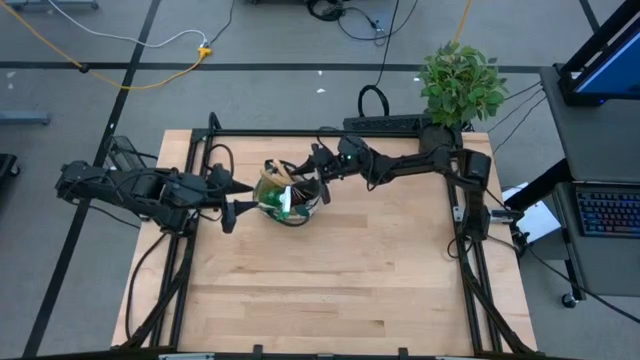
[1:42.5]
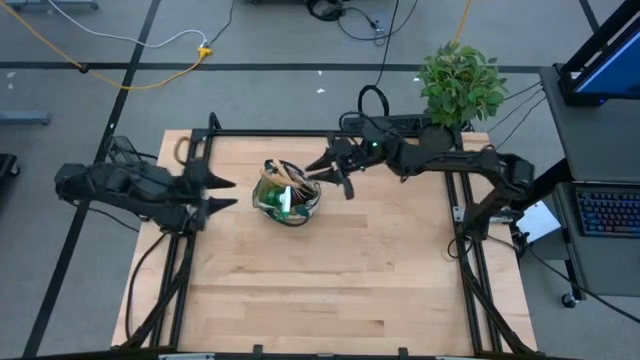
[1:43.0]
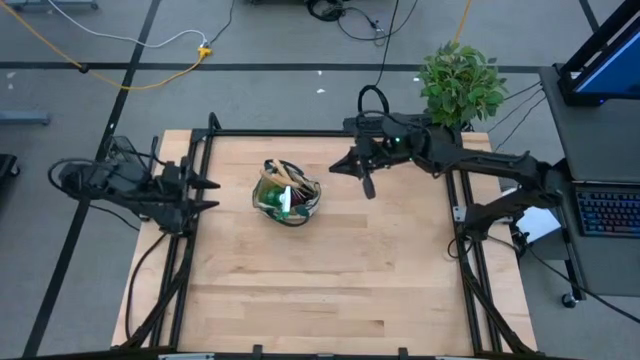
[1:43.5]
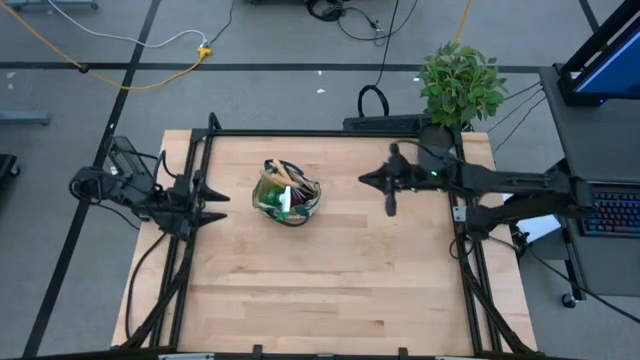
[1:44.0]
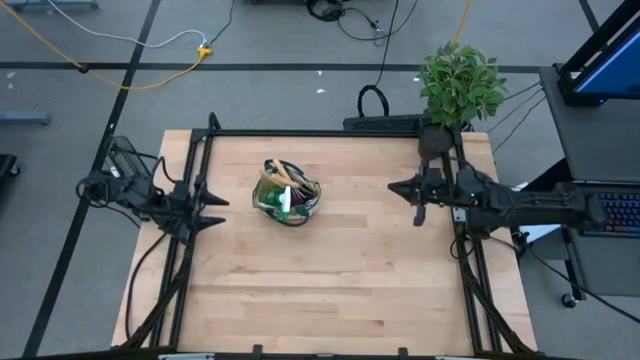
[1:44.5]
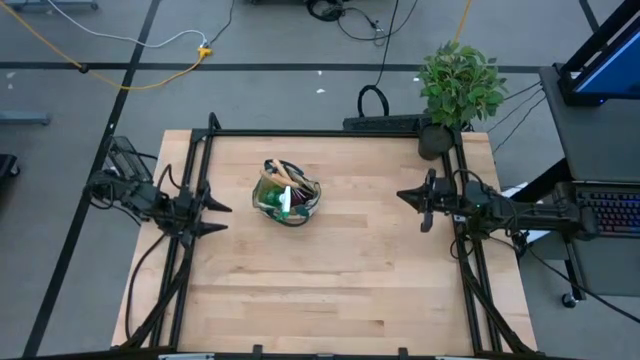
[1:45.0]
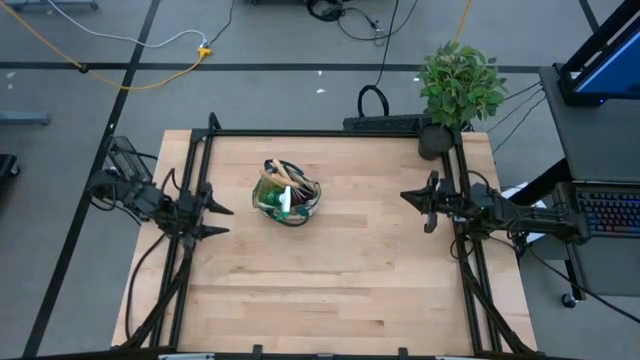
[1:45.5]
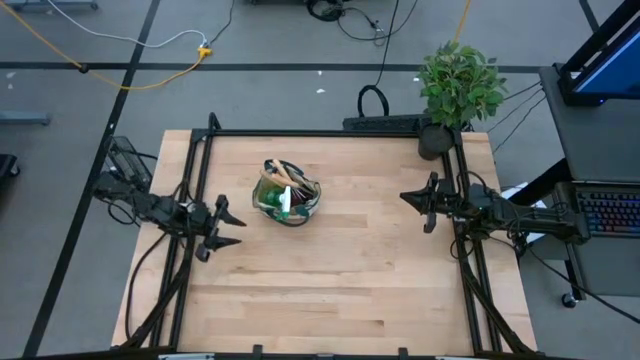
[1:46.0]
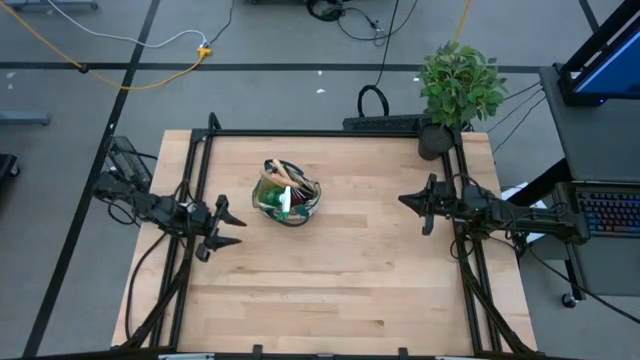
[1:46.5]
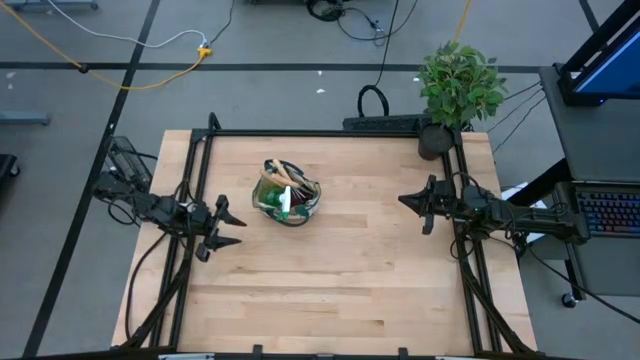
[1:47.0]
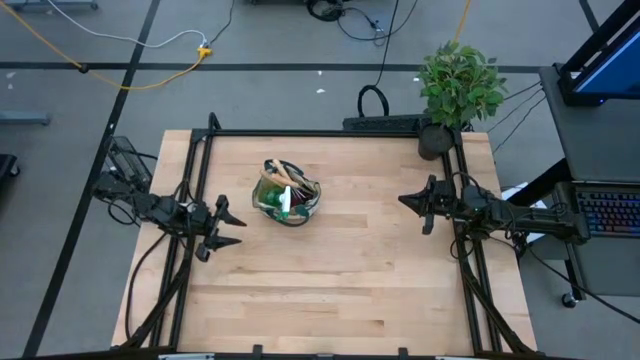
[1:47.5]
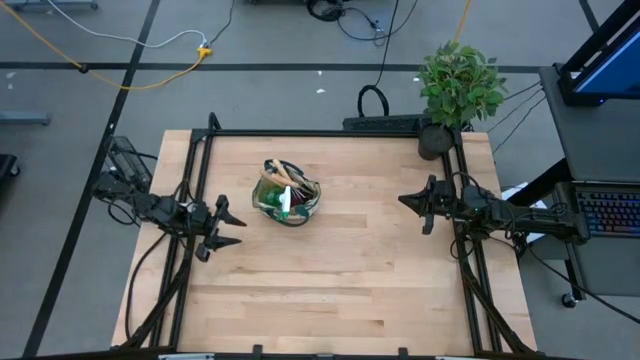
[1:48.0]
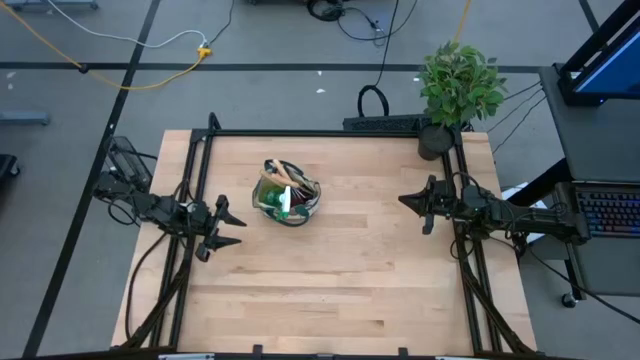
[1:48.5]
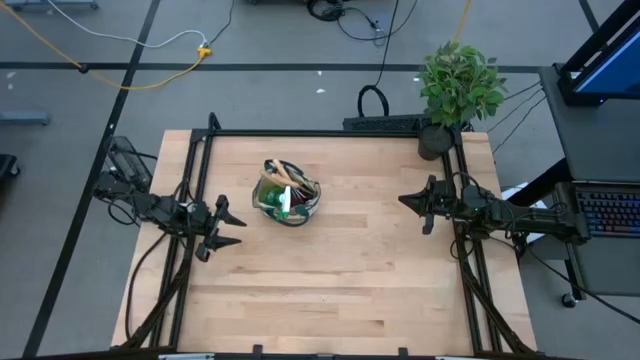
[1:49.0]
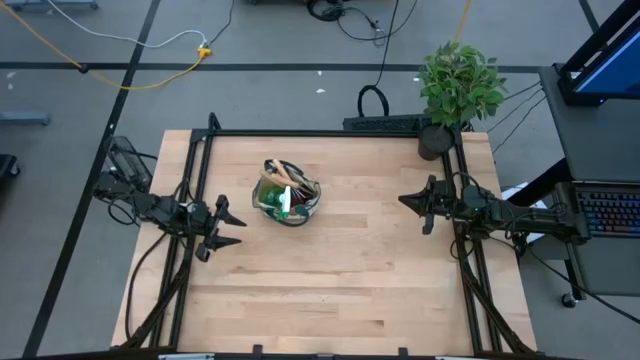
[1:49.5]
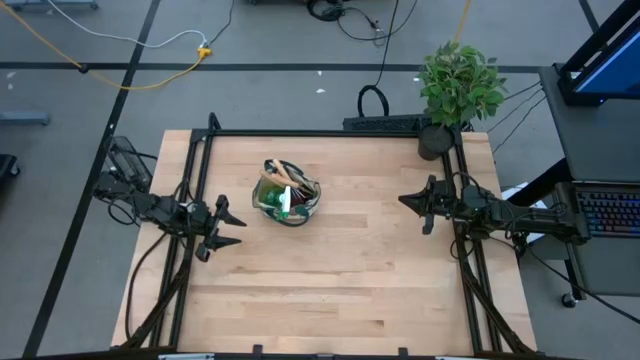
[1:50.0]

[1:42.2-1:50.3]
Task: Pick & Place Garden tools in Gardening bag
Return to Home Position

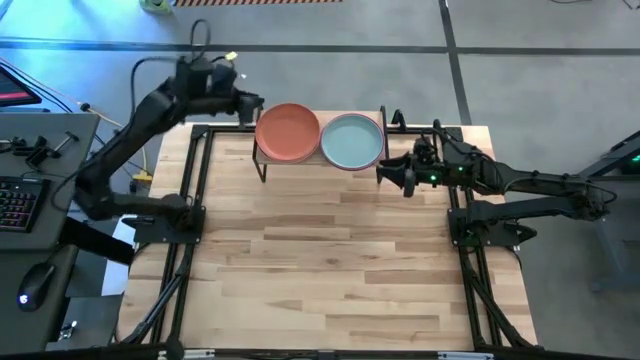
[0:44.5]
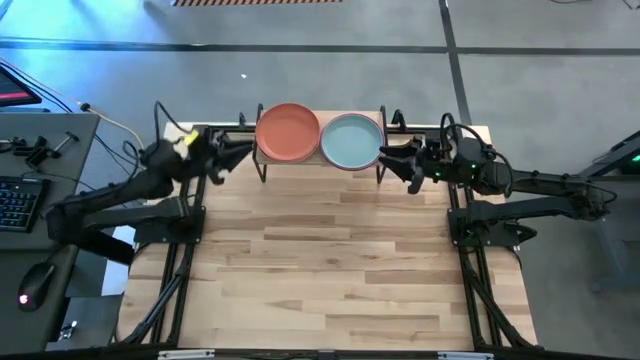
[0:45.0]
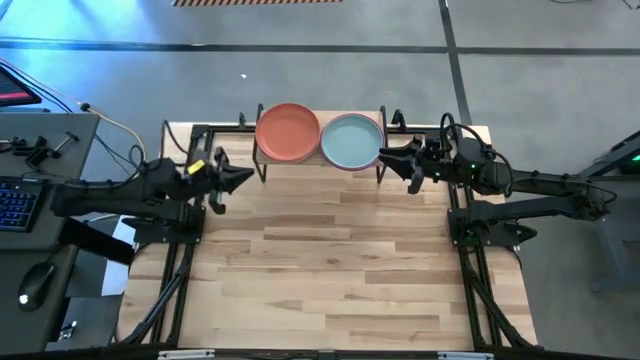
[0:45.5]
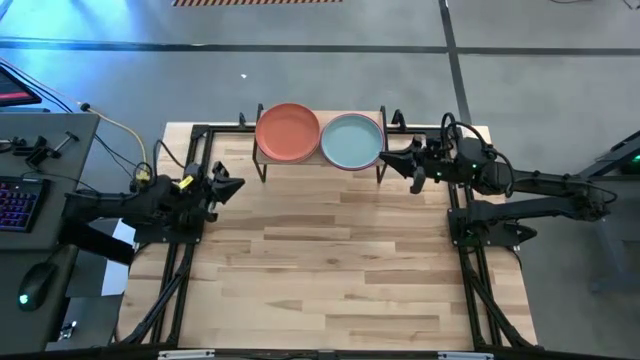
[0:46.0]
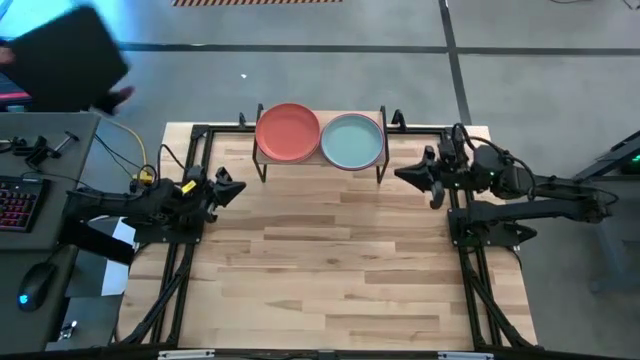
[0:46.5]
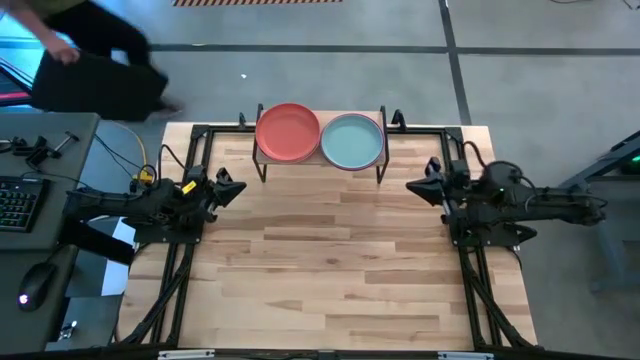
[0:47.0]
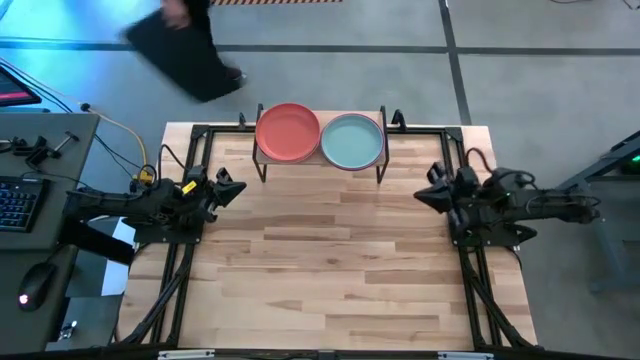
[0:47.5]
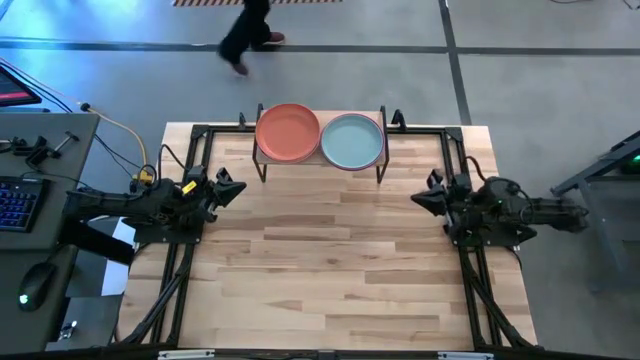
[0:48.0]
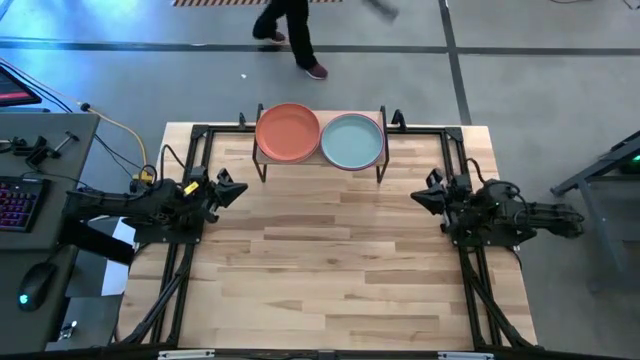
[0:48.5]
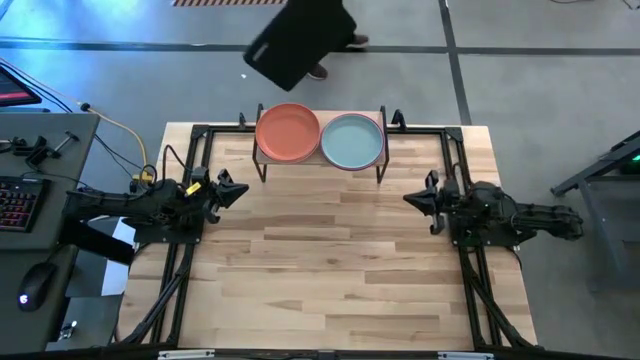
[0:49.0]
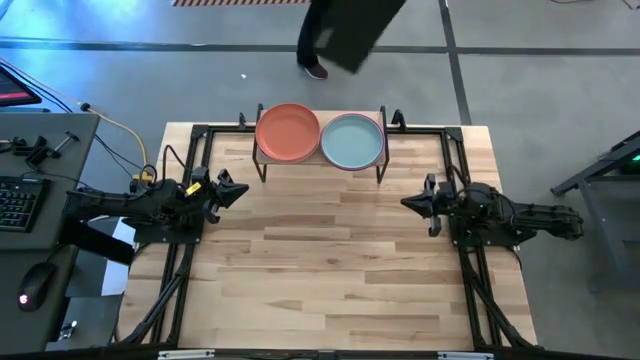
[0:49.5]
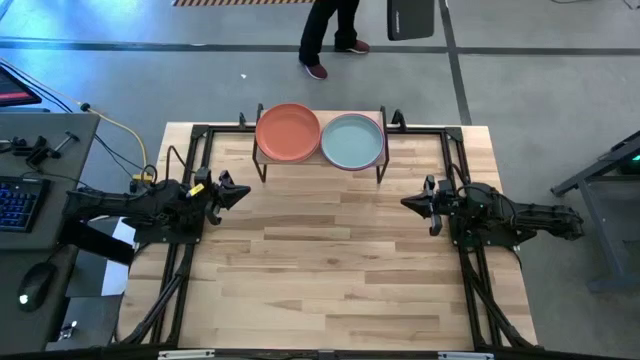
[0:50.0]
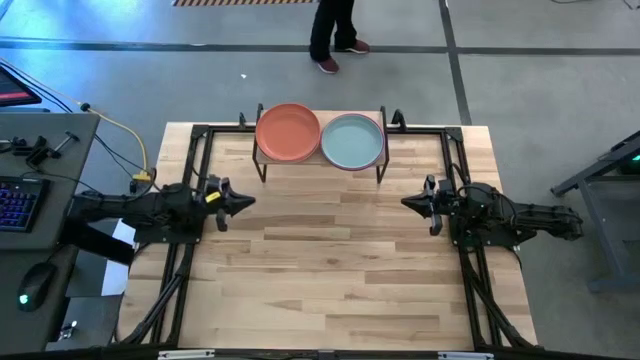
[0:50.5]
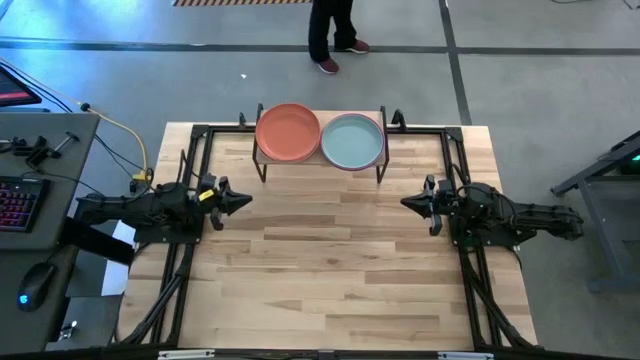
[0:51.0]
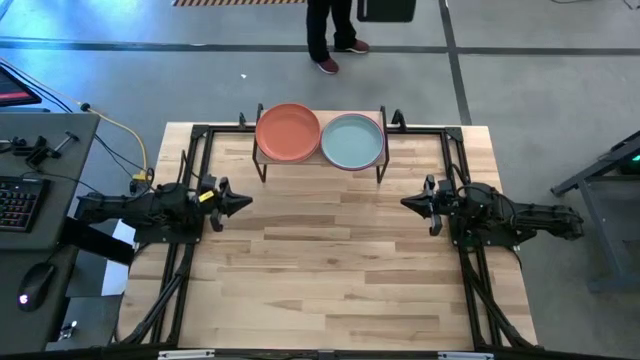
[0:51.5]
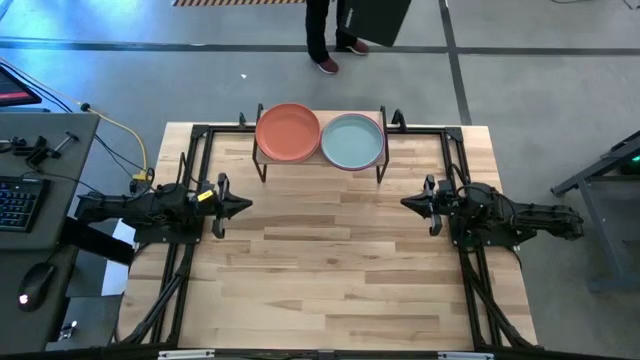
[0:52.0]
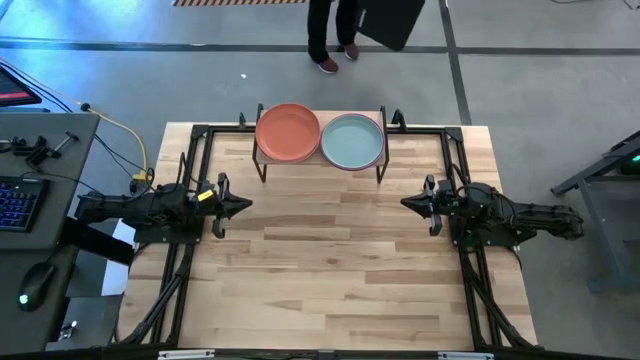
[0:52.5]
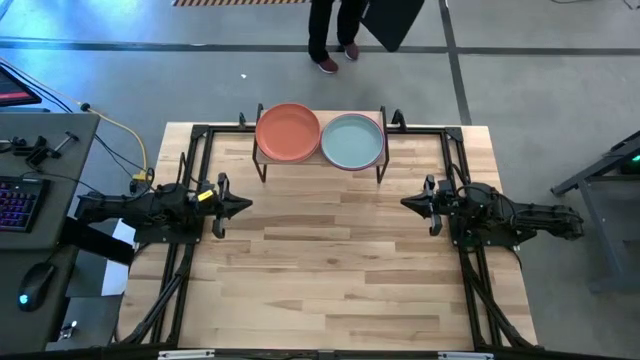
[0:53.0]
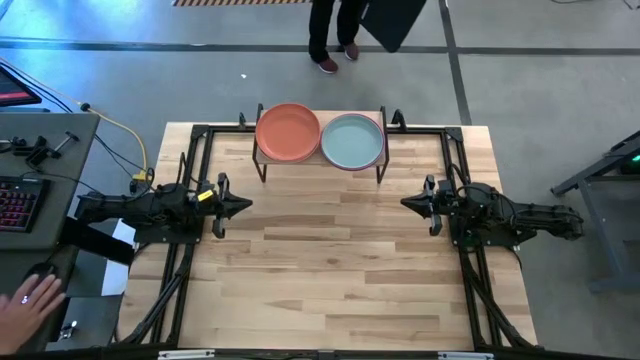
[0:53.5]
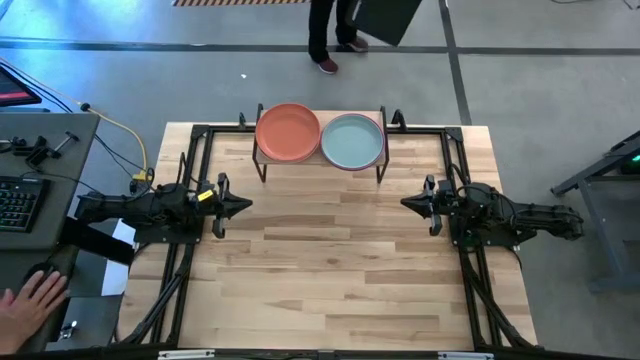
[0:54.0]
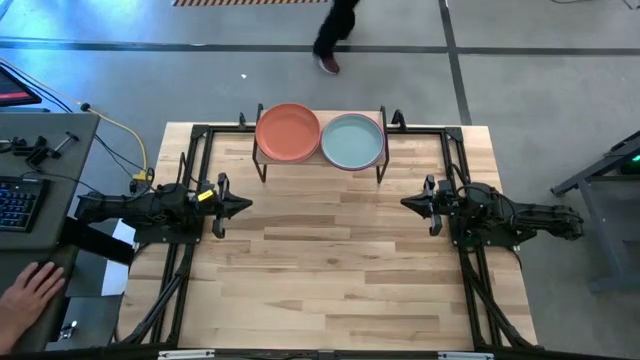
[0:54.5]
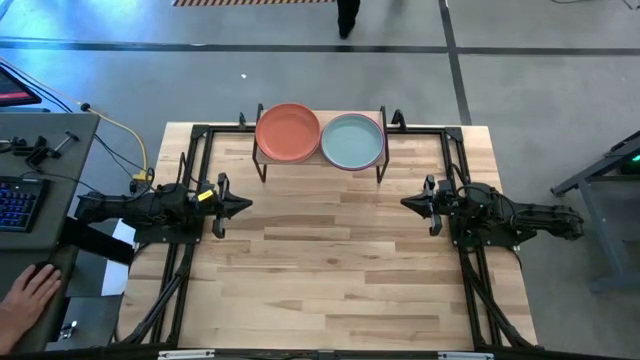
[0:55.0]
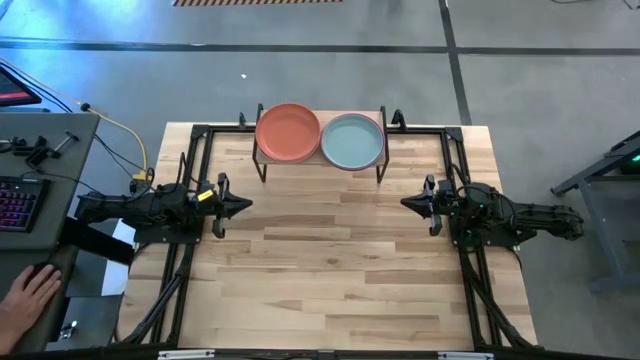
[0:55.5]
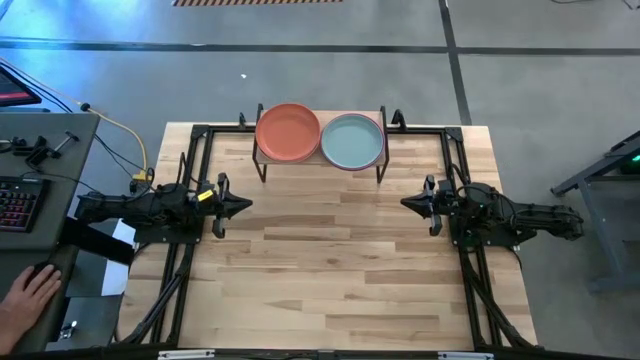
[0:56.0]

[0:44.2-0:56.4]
Task: Place and stack plates onto a shelf
Return to Home Position

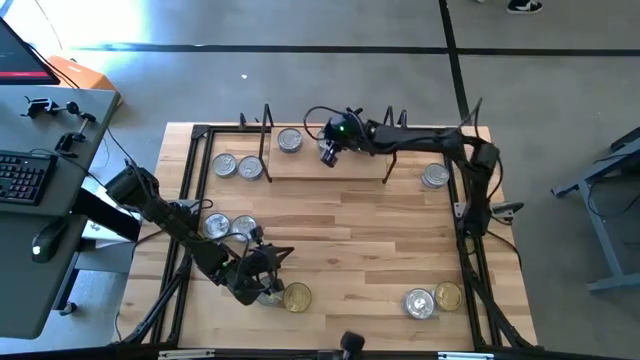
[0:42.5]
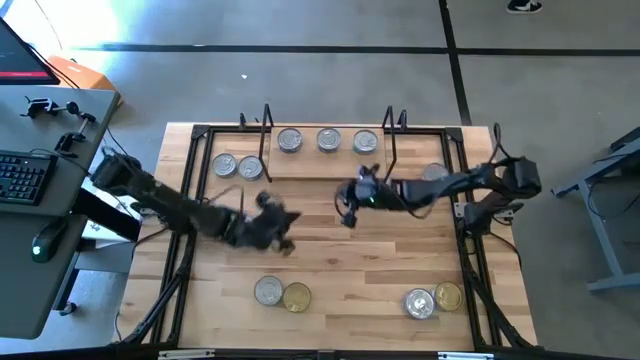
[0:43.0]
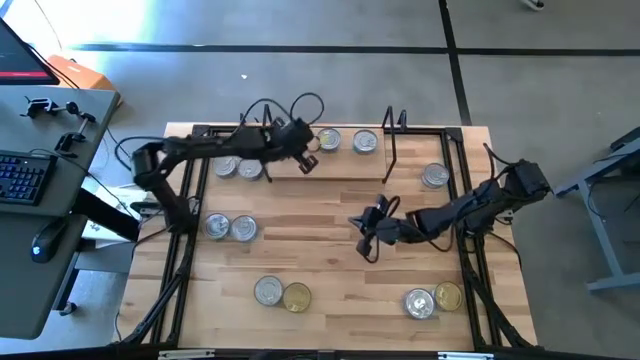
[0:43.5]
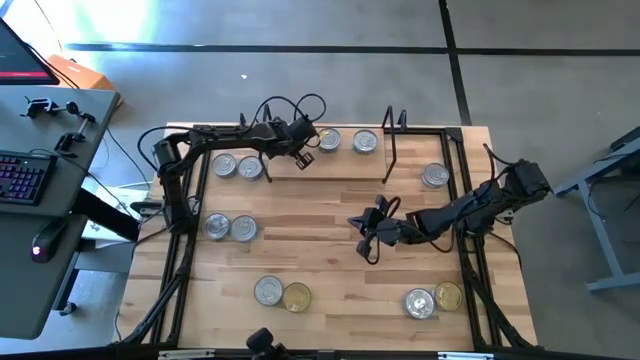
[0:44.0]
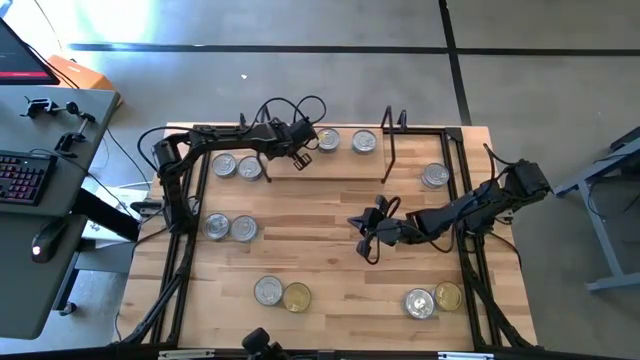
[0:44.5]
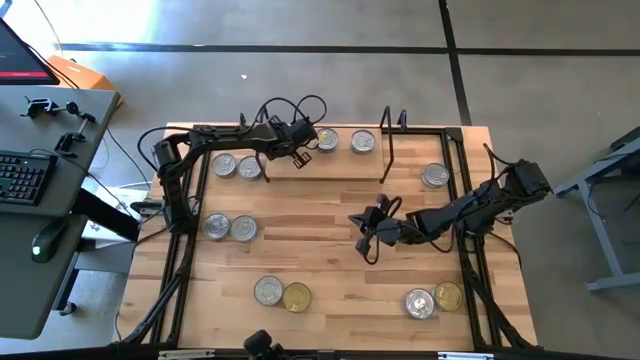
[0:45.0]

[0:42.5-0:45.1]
Task: Stack canned seafood by type on shelf
Adjust the blue tuna can on the shelf
